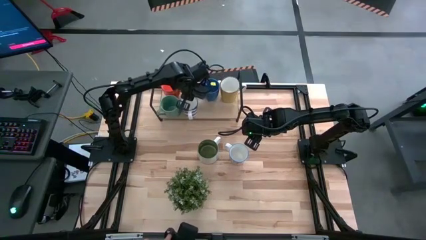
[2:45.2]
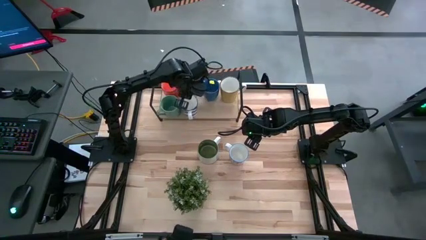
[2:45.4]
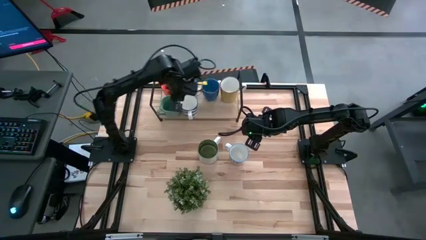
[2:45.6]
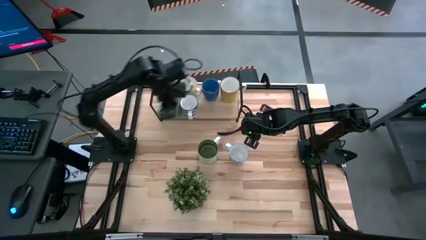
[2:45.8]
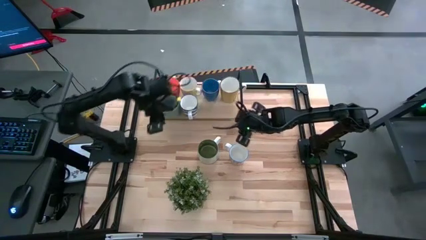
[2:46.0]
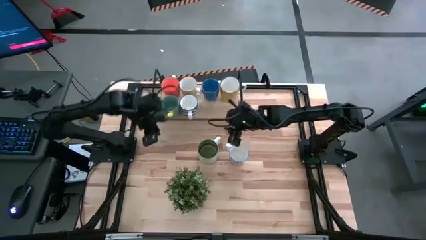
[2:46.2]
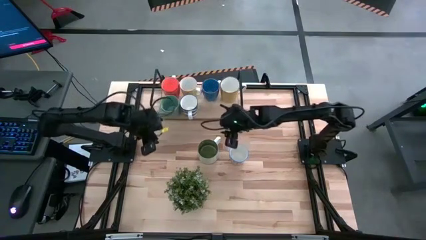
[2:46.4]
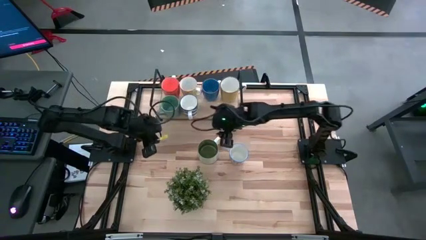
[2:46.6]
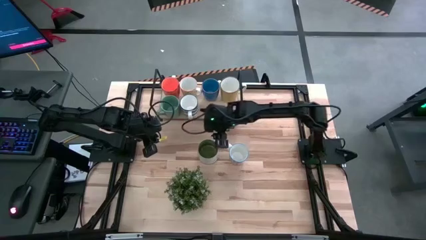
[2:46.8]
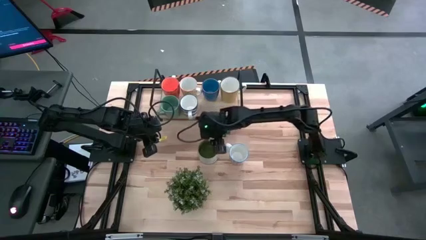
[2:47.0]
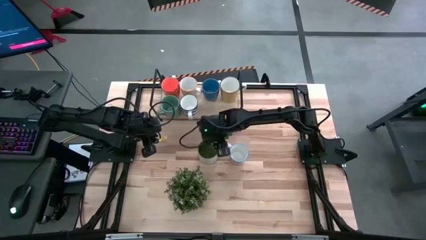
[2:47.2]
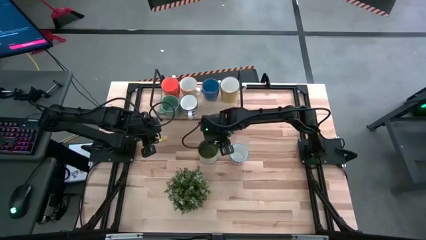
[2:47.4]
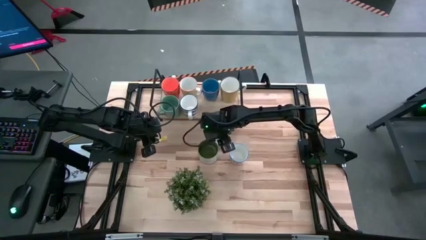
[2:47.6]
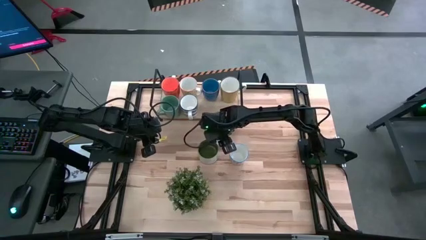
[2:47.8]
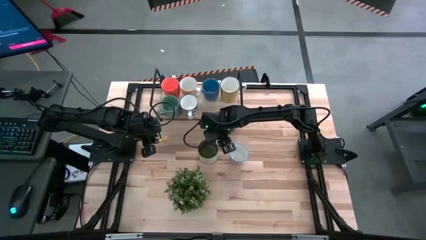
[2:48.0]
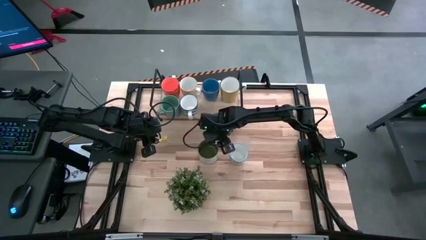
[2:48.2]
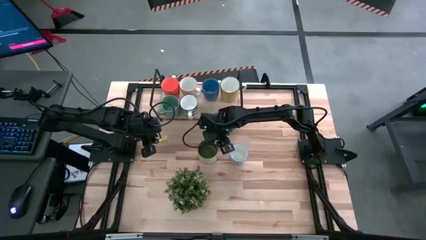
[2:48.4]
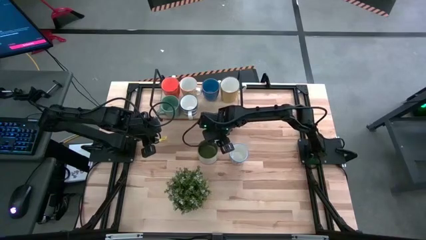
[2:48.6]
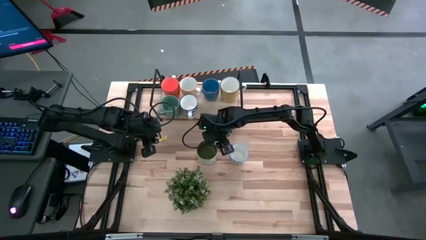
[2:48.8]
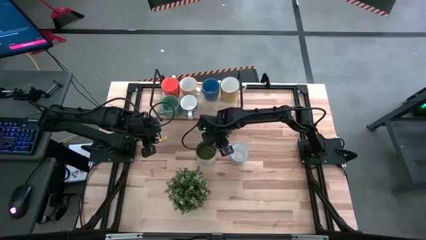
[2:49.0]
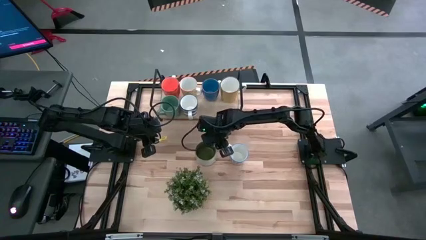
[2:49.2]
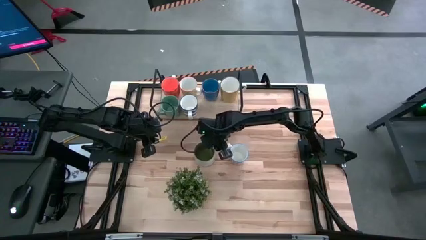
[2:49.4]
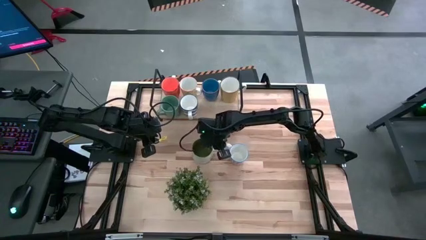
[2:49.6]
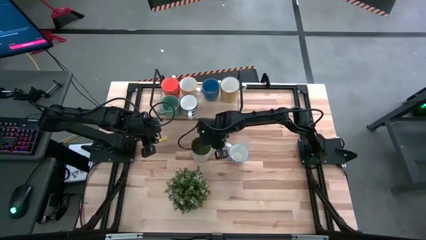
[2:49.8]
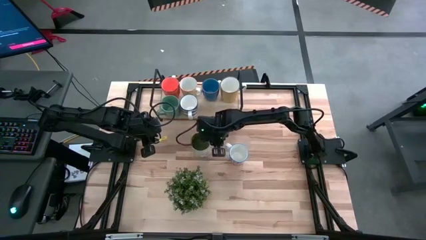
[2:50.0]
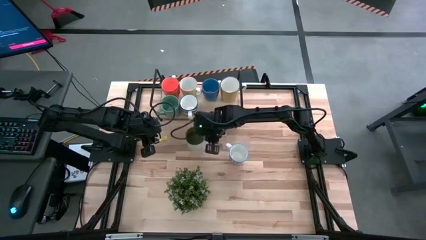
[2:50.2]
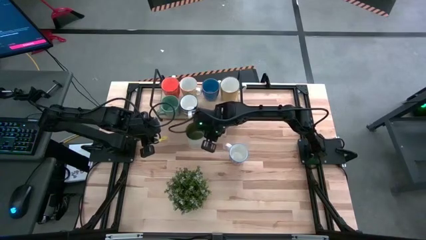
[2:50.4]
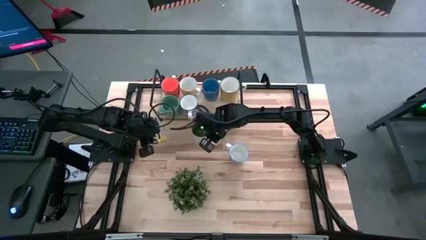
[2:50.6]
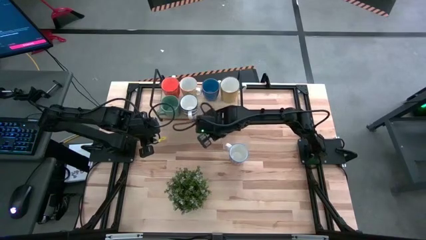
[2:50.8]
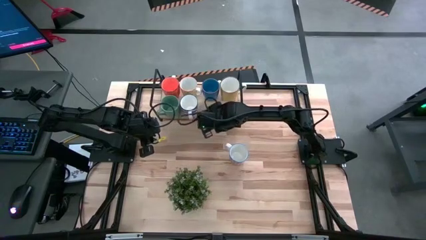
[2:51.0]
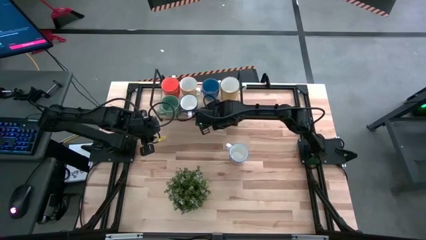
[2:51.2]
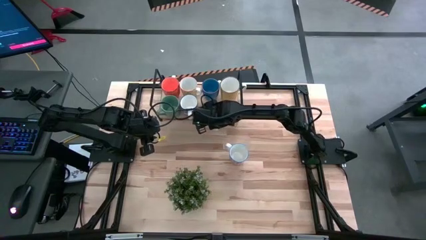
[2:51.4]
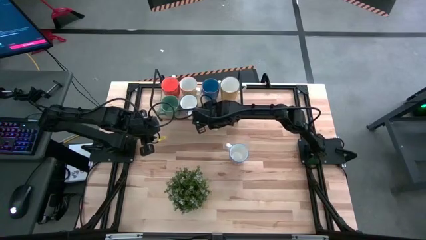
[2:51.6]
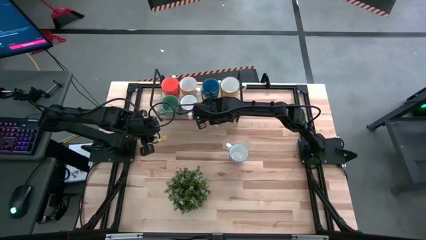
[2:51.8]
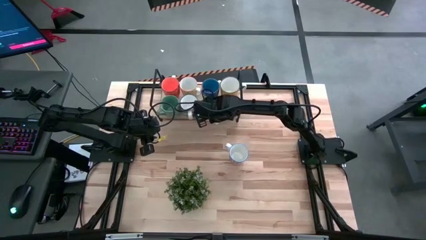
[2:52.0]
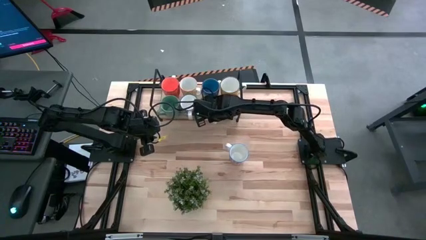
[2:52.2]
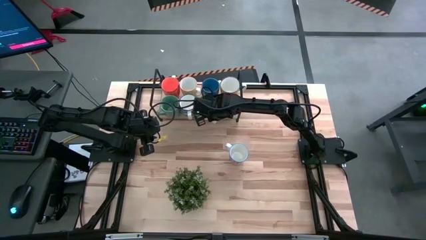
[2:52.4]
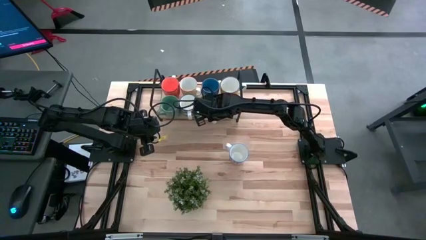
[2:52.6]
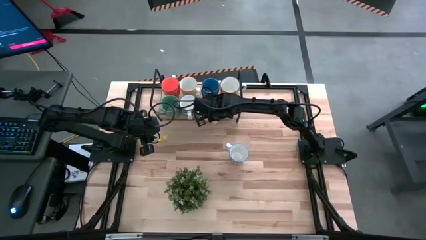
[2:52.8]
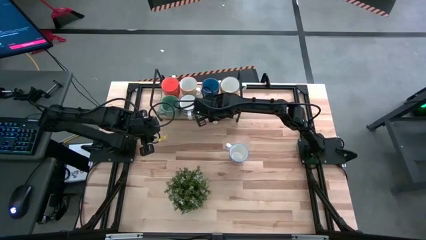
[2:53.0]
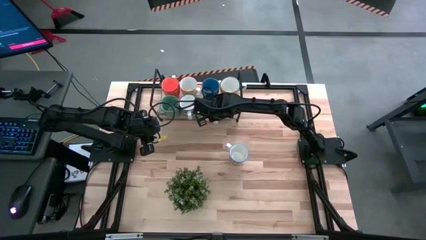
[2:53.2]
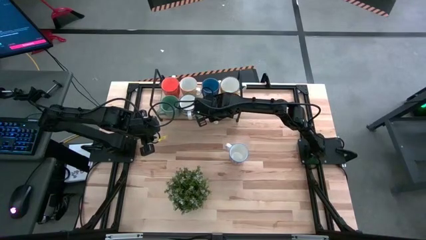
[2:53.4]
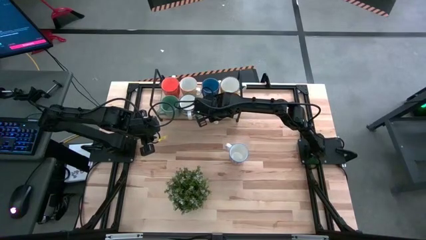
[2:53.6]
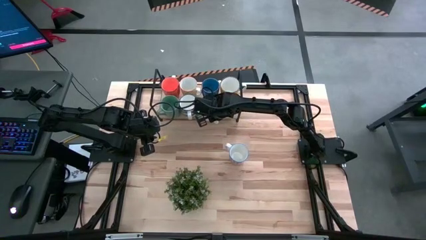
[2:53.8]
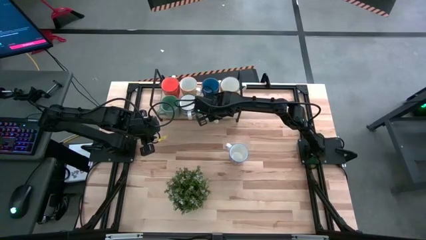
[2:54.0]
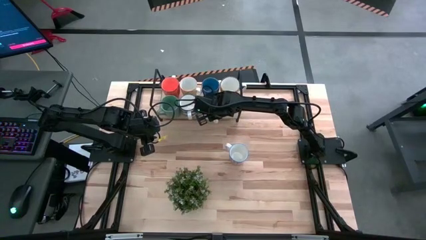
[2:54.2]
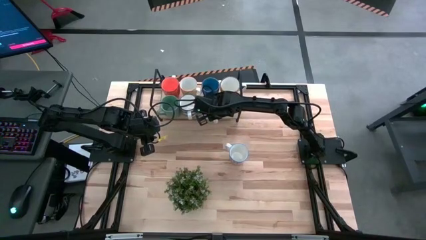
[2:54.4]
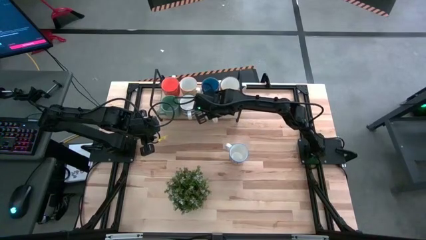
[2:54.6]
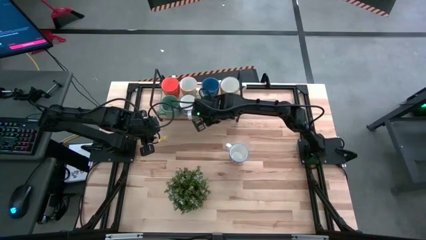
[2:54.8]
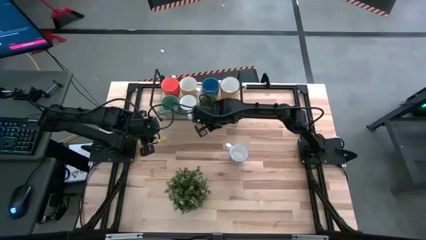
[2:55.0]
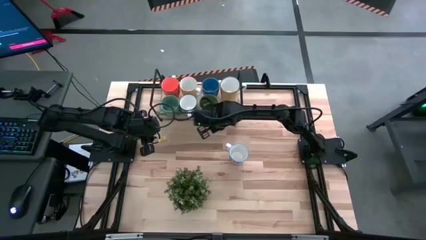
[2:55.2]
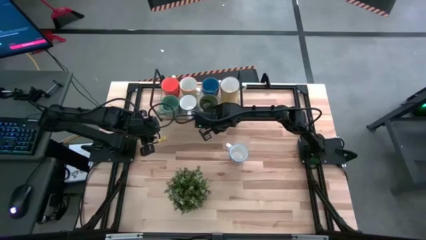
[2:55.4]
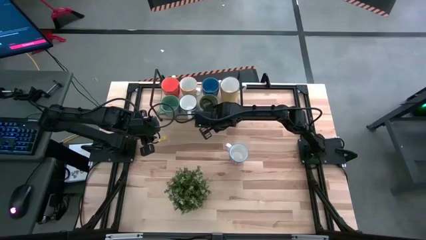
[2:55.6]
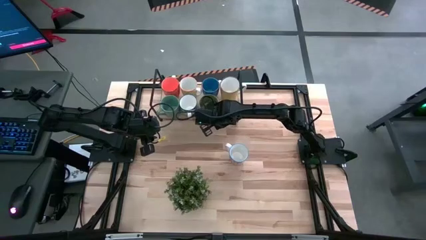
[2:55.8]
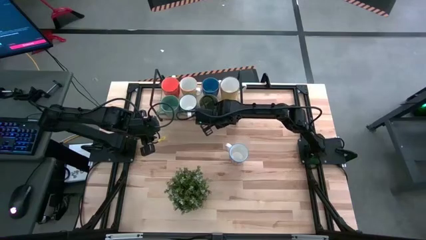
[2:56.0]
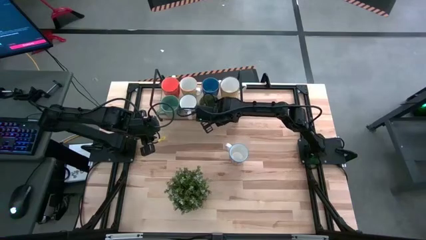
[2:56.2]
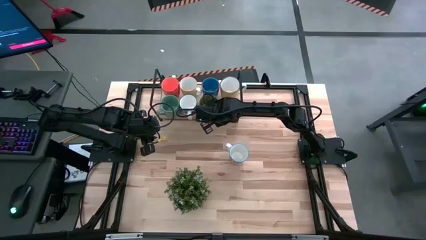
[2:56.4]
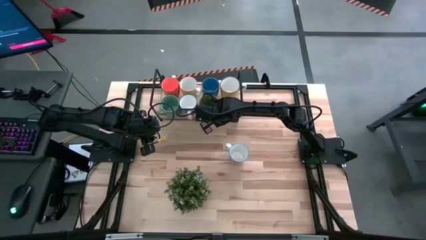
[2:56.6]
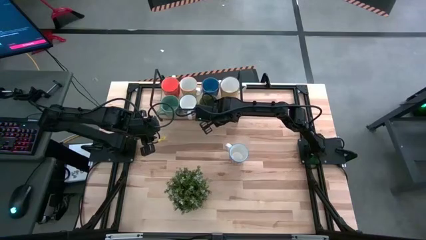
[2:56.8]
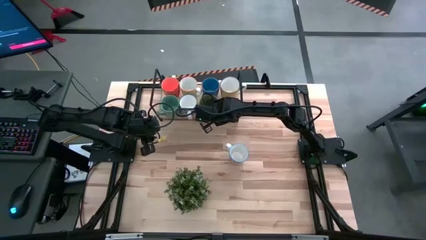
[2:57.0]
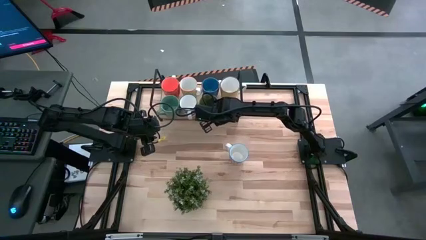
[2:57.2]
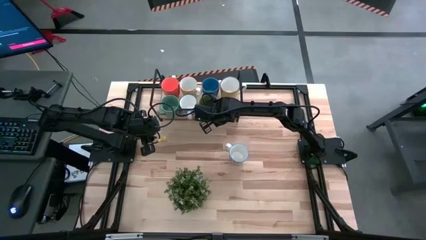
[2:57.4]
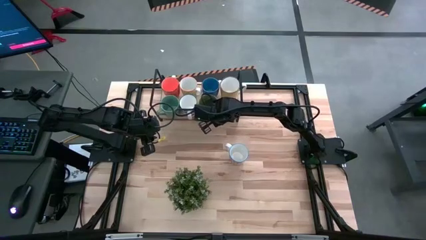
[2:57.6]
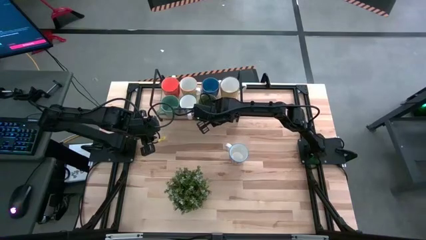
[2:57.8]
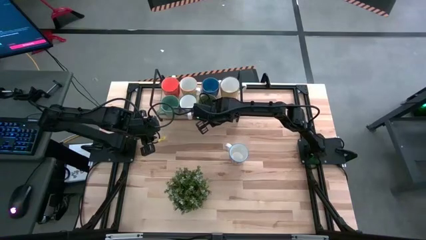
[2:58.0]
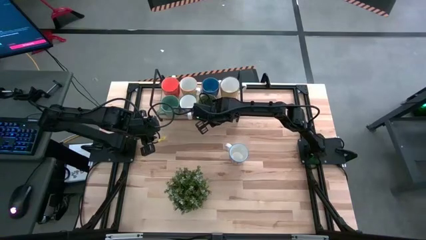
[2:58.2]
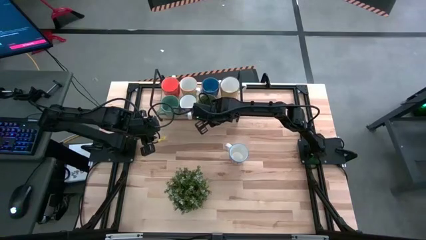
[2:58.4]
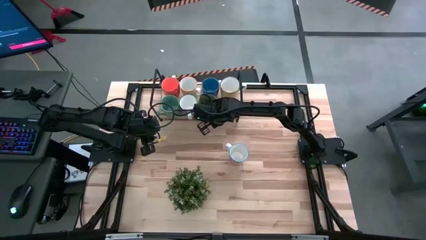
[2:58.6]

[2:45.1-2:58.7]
Task: Place coffee mugs
Put the dark green mug on the shelf
